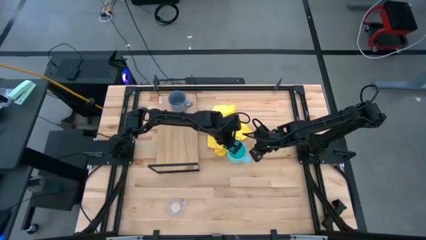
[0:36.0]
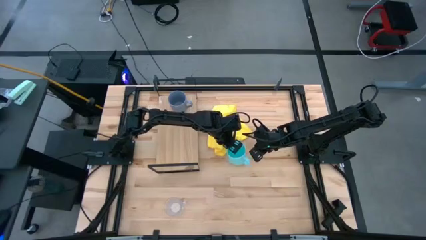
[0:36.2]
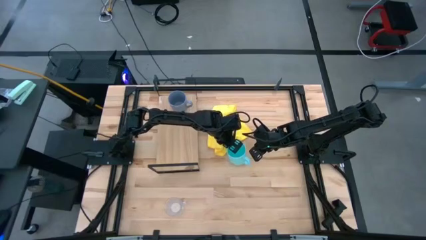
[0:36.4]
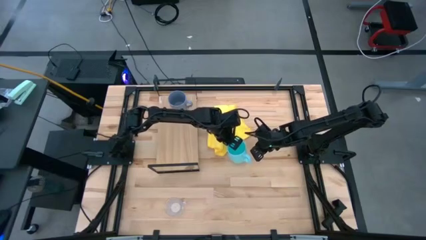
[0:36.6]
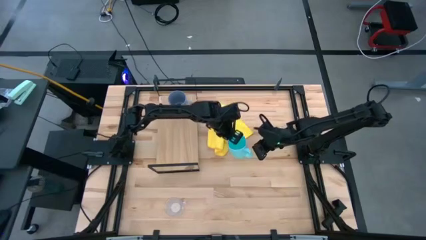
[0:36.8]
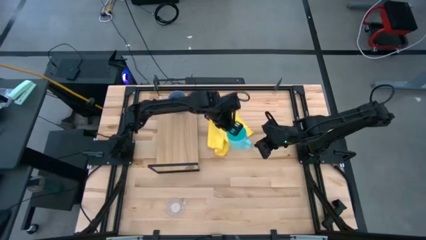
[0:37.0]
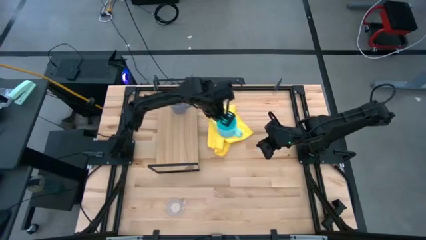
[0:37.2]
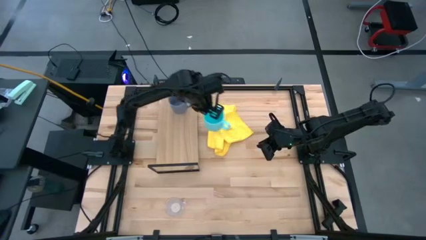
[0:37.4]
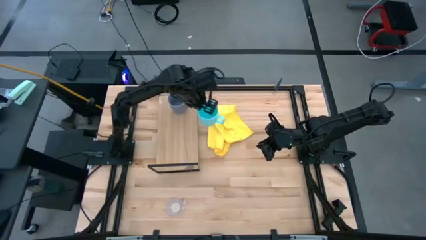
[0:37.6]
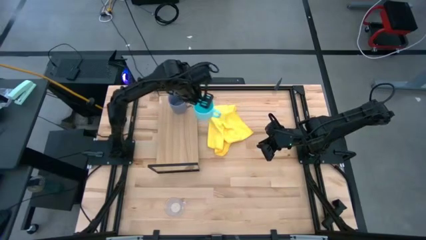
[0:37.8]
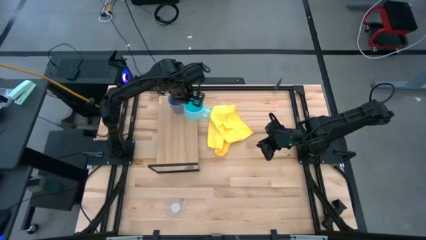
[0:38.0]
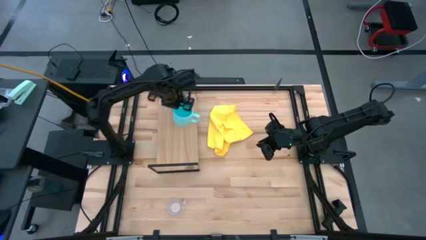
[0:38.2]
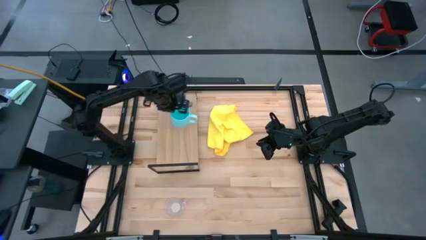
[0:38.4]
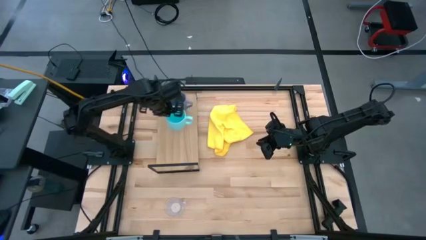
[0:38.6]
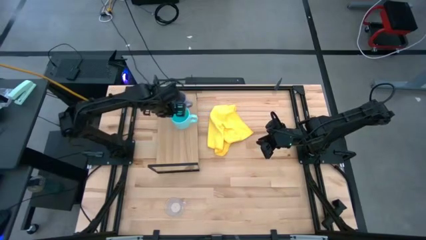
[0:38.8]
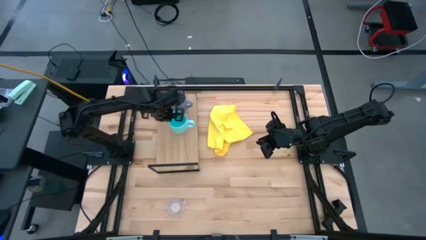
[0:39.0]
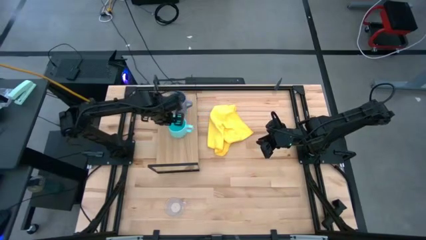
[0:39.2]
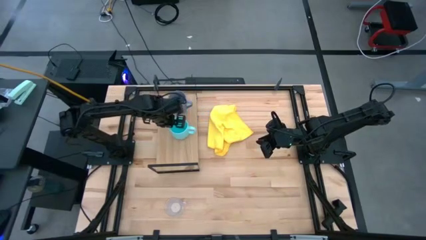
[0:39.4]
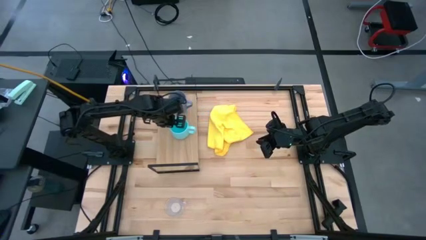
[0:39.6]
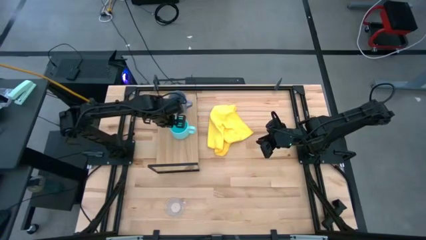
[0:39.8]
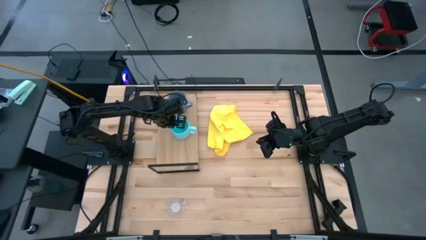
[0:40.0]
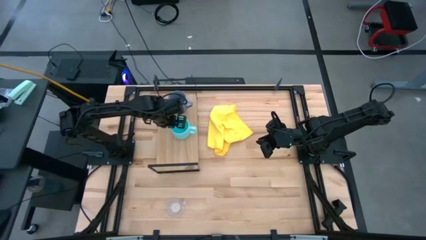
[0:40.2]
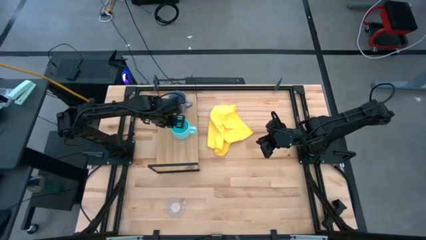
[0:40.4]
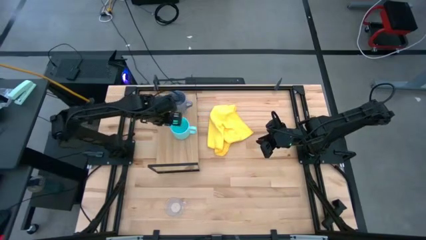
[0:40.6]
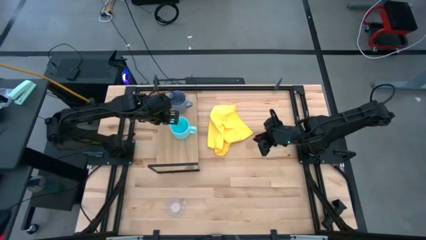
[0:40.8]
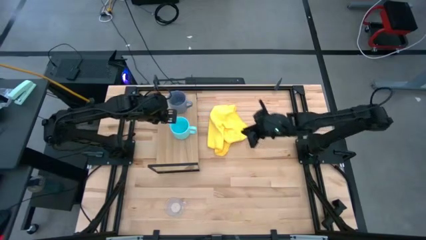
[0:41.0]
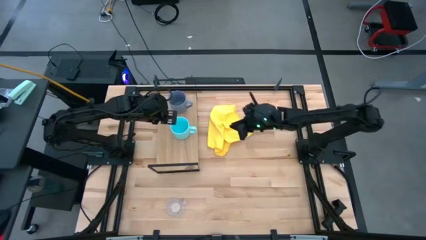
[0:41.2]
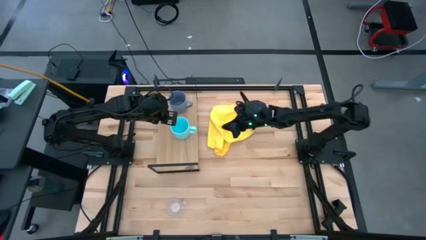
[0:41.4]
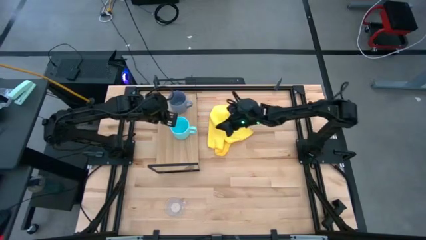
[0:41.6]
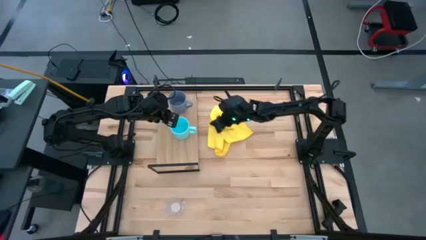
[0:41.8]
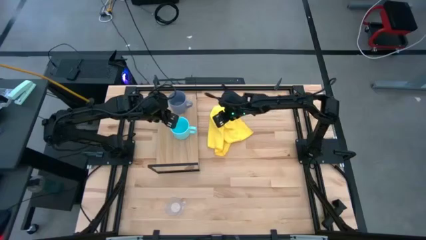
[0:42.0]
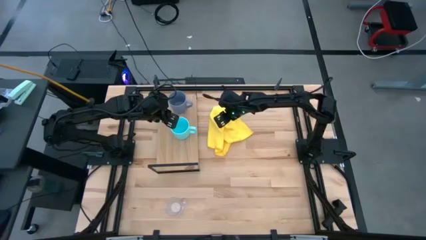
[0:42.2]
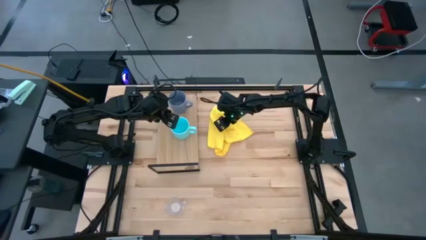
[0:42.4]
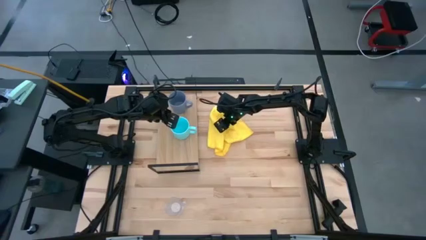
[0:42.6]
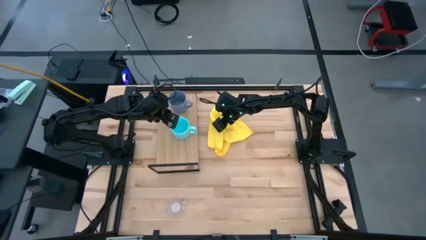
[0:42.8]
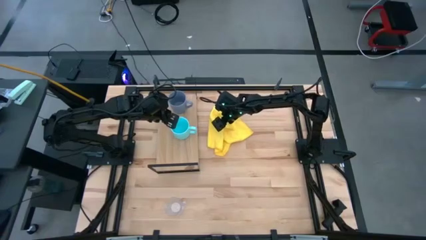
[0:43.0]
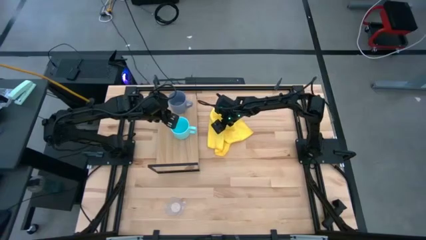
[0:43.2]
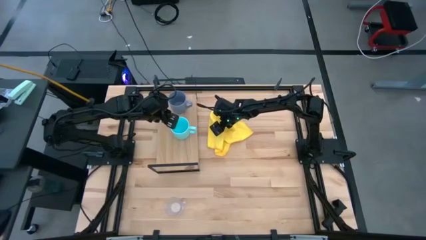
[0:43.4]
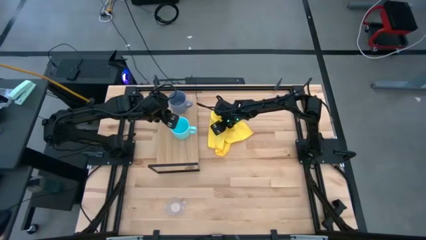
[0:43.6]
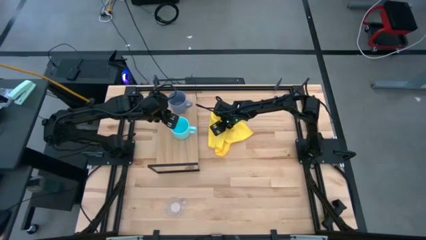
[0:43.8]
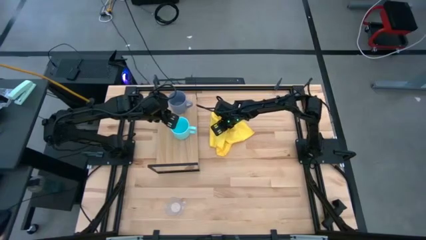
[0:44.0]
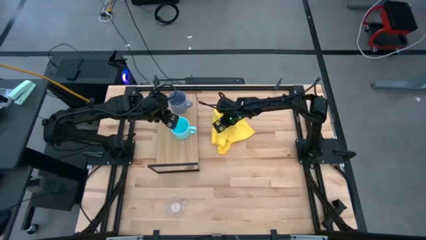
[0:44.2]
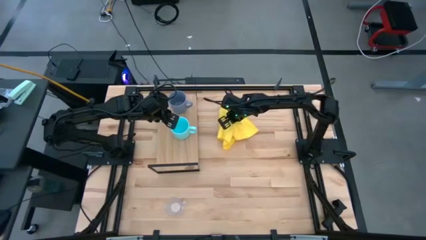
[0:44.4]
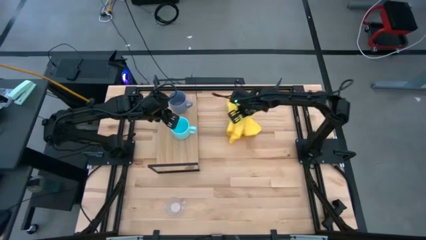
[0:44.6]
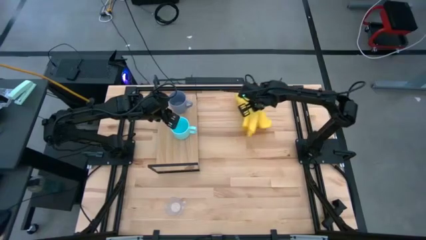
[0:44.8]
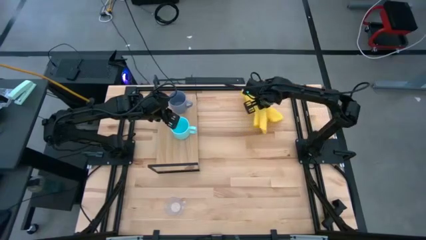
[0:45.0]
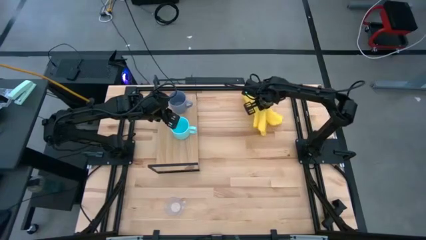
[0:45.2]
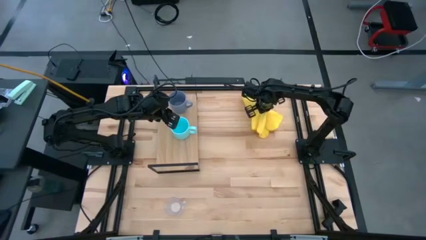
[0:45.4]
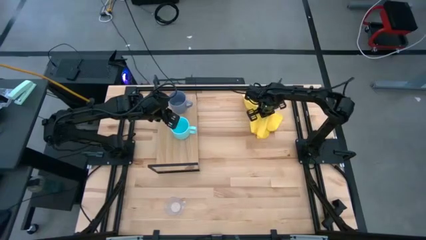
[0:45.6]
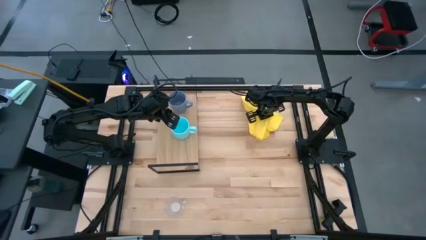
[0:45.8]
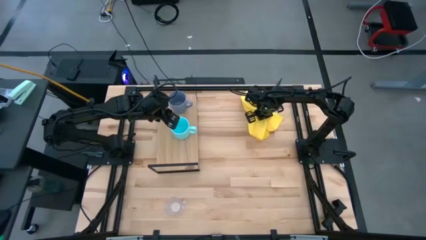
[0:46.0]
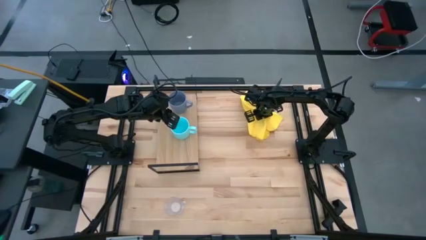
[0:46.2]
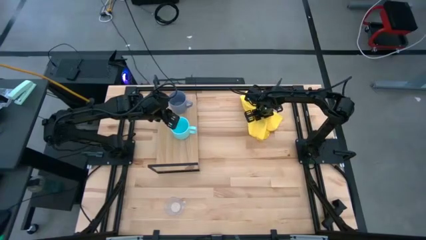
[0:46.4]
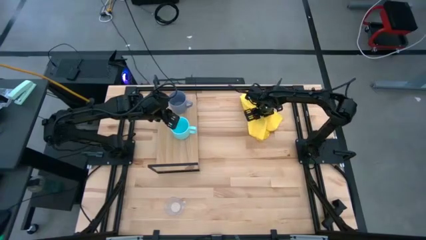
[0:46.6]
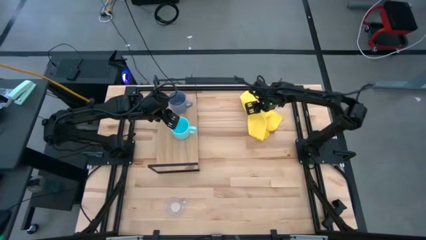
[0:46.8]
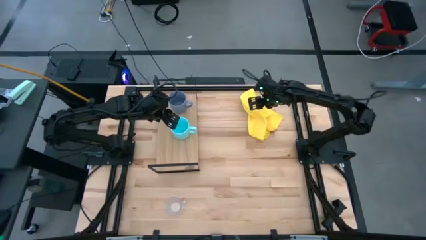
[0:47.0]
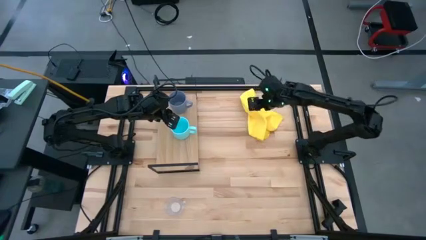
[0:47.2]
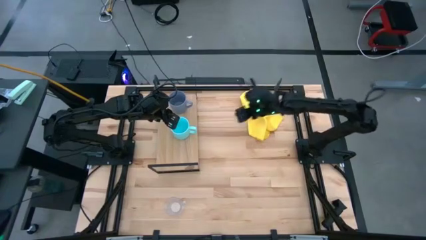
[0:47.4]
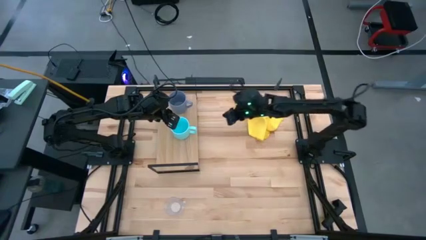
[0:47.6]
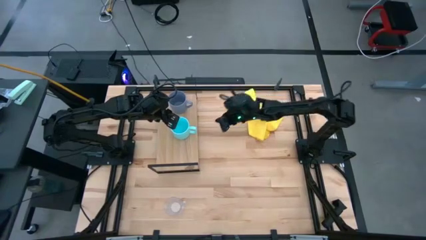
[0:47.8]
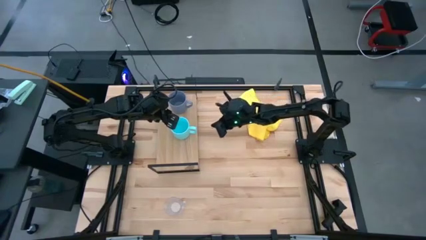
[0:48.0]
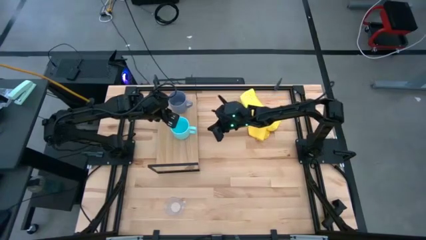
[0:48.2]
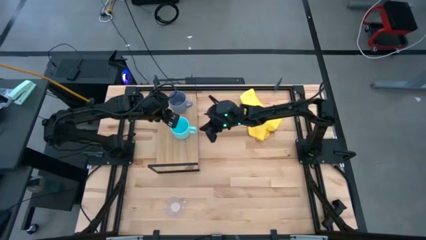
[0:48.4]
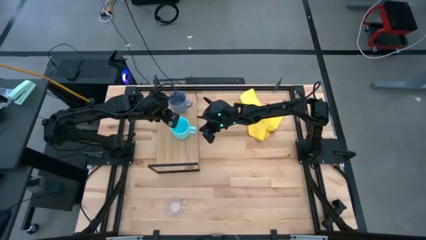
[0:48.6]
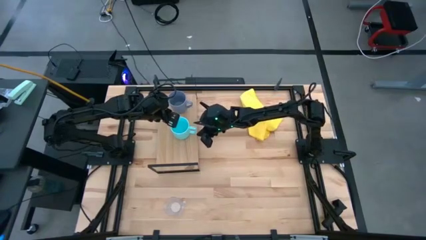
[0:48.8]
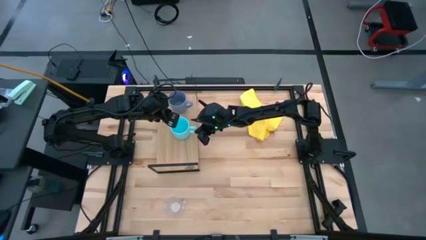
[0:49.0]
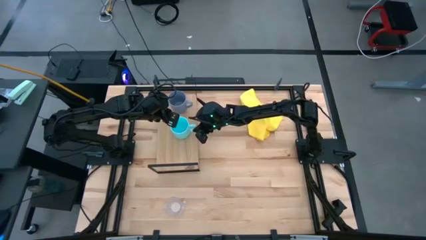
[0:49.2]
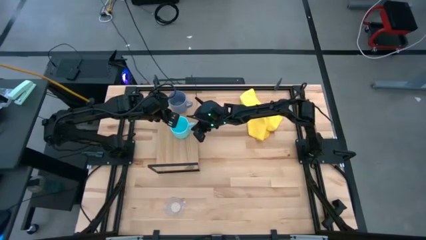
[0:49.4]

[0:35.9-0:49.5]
Task: Stack small to large cups/mugs on shelf
Put the blue mug on the shelf
